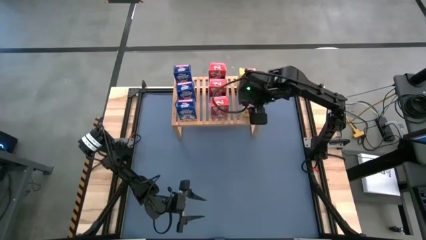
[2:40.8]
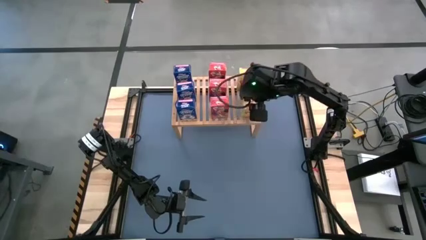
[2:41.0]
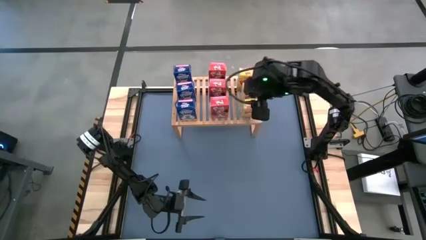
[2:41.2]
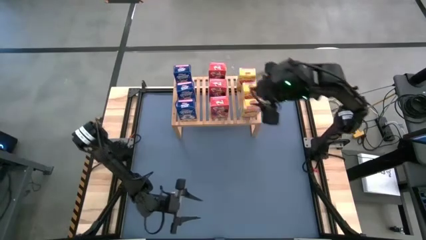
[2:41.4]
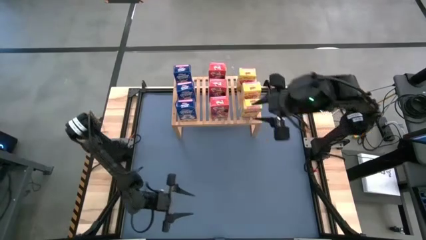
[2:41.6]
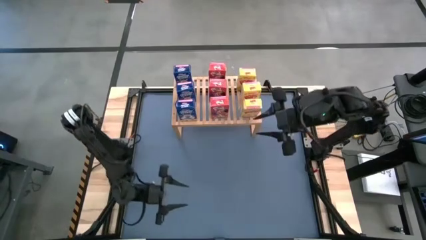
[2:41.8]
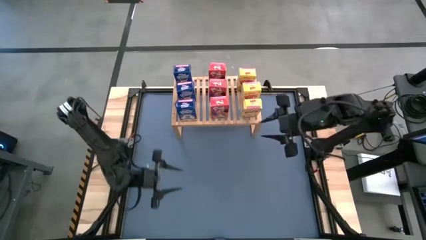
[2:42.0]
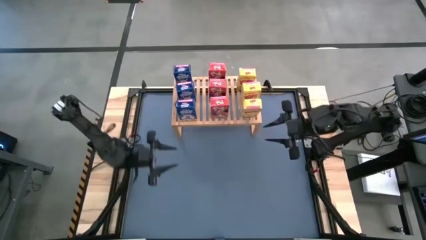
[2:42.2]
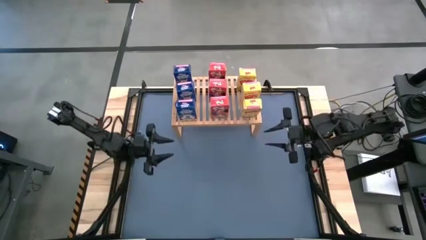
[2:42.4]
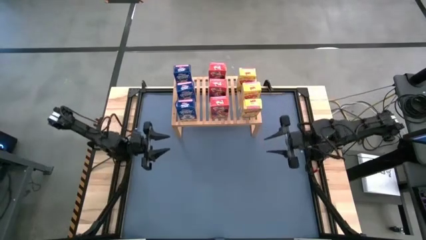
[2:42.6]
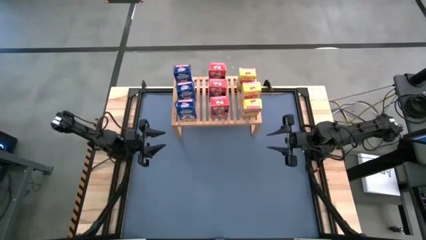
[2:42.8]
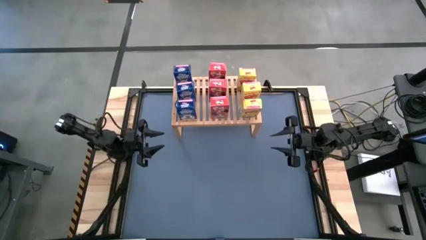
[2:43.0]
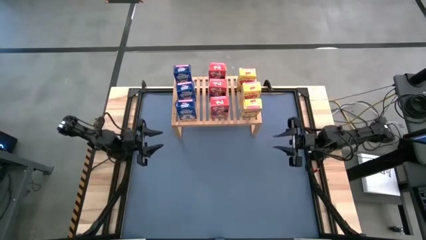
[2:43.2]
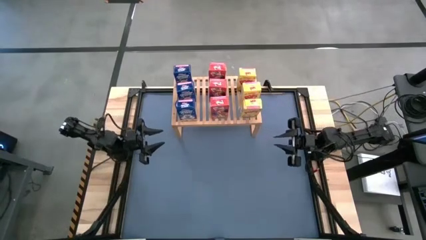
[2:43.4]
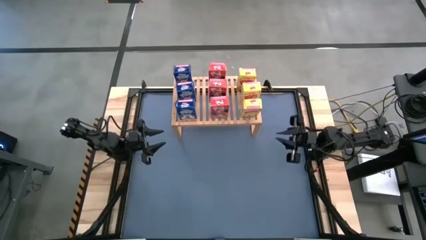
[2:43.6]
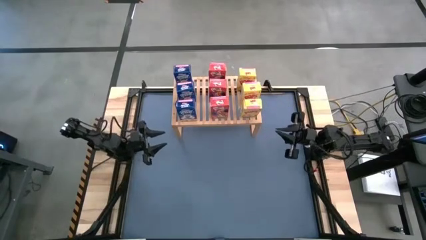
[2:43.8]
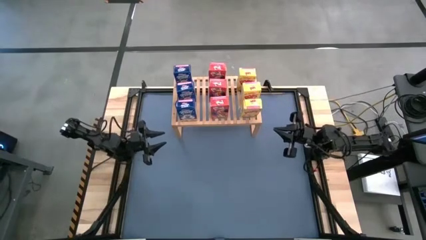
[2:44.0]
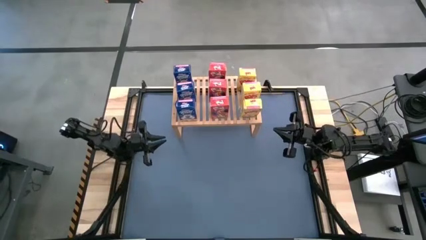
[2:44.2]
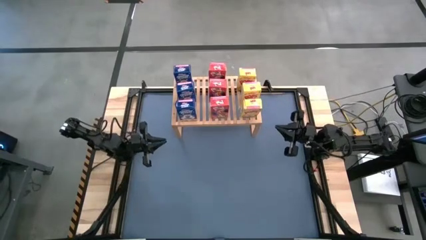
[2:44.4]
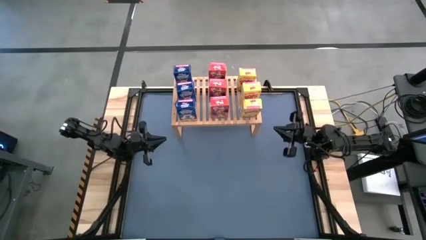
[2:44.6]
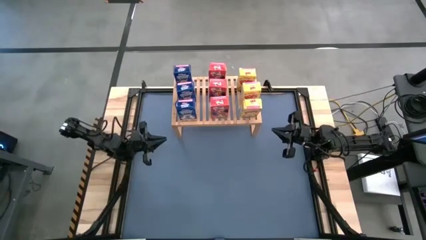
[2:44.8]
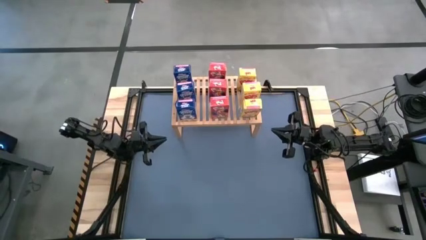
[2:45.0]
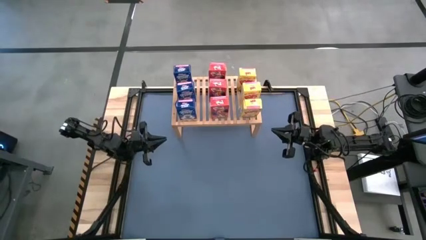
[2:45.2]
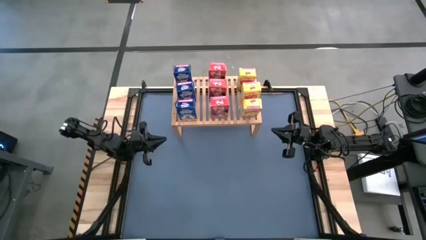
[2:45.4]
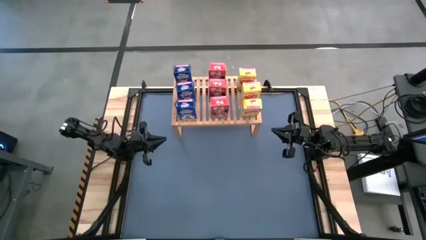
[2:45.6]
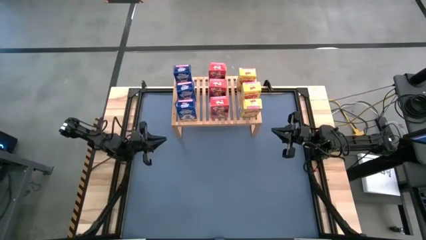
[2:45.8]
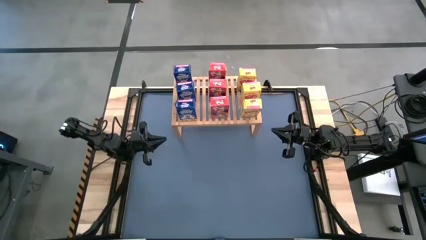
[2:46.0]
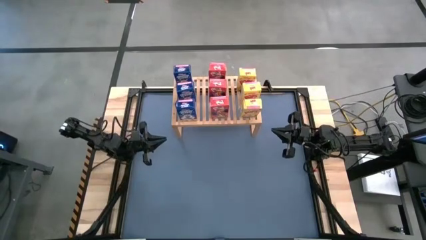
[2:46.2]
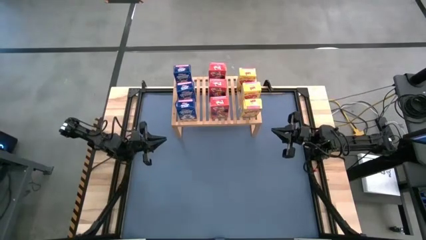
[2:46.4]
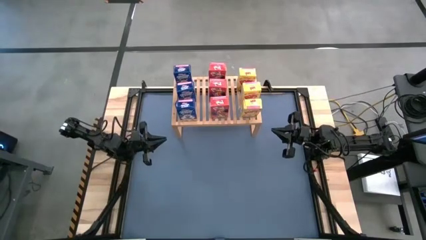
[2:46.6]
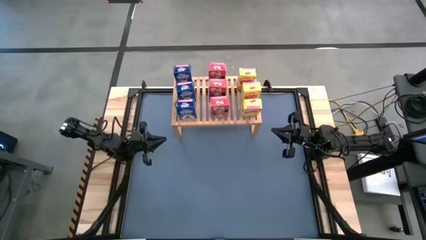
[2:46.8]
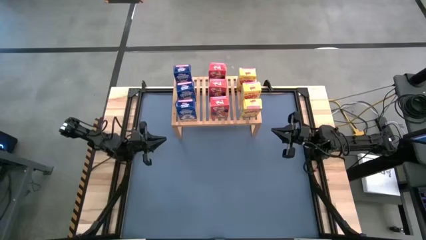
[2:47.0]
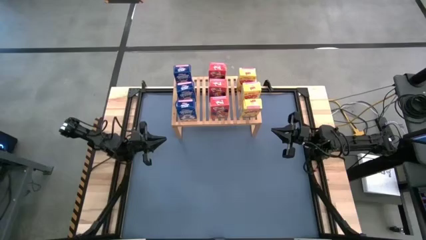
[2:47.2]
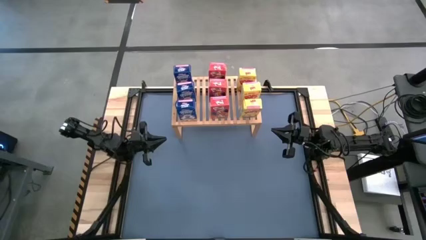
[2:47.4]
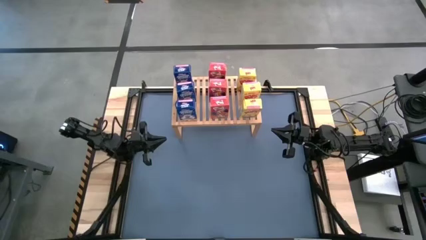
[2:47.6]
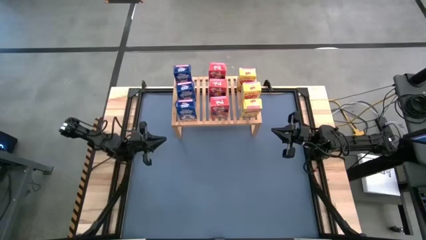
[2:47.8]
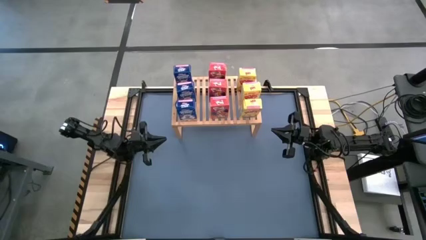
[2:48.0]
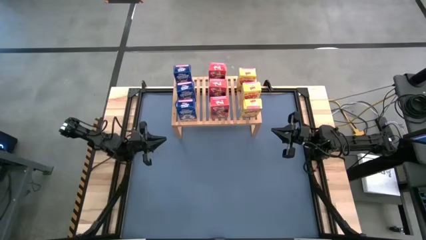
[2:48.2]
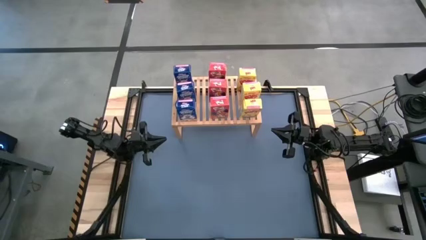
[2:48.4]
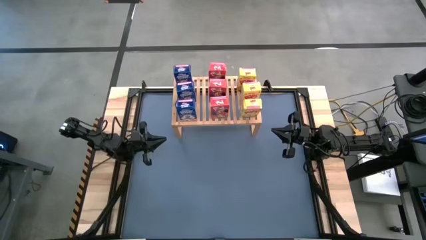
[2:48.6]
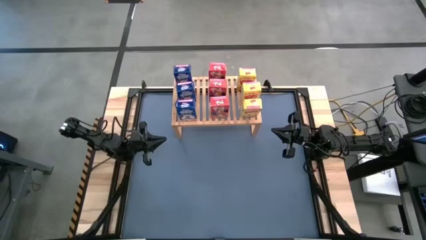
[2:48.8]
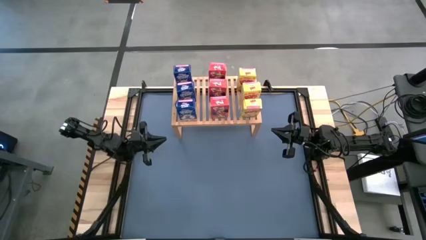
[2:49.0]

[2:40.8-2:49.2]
Task: Stack cereal on shelf
Return to Home Position

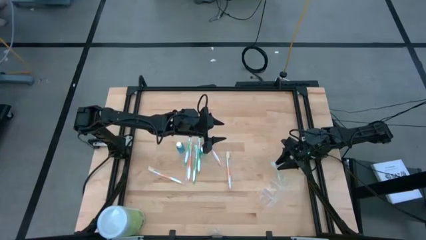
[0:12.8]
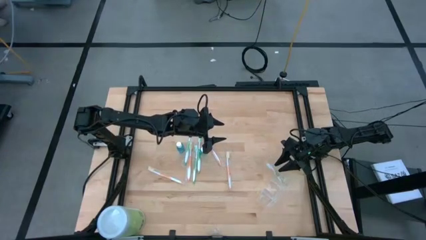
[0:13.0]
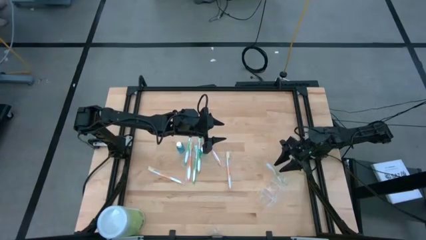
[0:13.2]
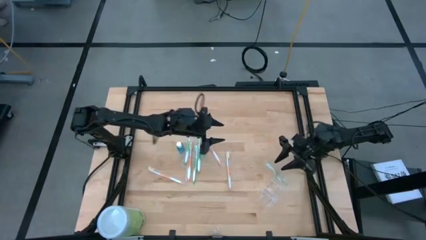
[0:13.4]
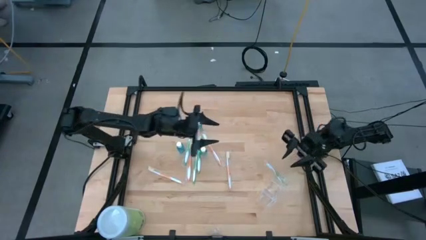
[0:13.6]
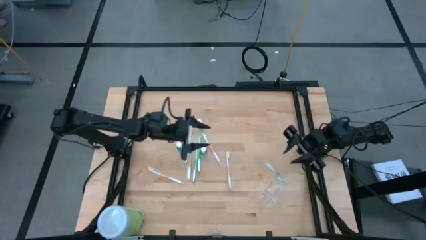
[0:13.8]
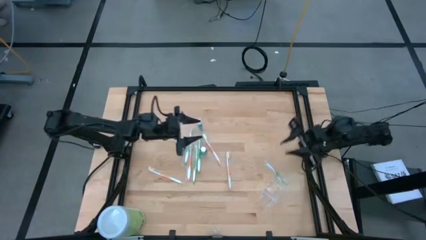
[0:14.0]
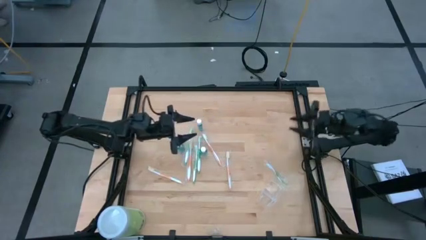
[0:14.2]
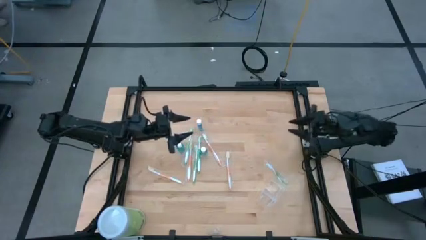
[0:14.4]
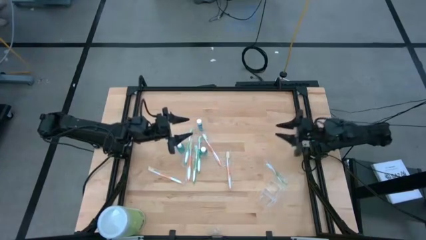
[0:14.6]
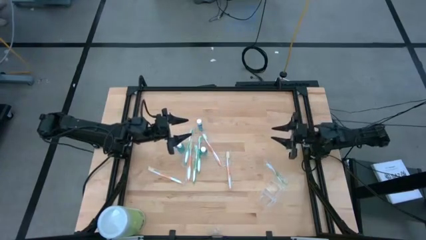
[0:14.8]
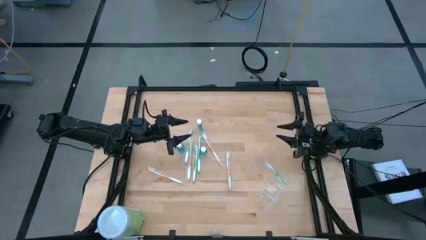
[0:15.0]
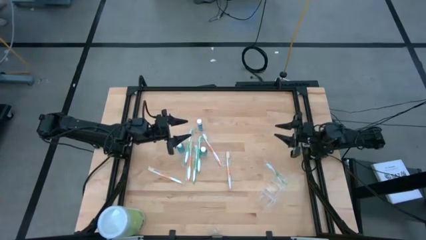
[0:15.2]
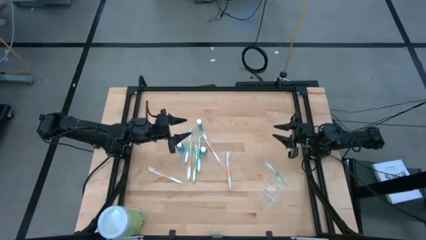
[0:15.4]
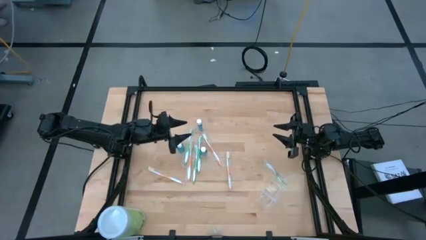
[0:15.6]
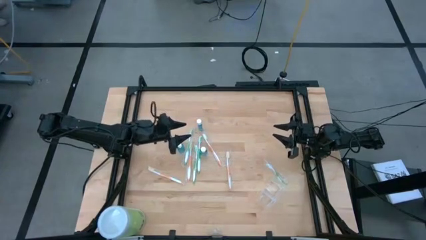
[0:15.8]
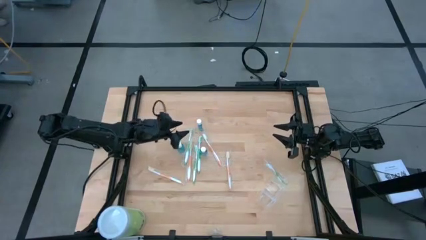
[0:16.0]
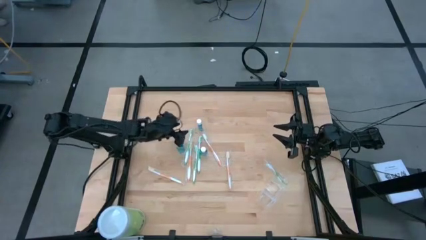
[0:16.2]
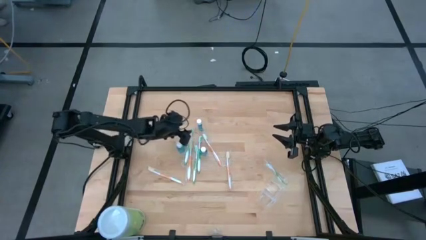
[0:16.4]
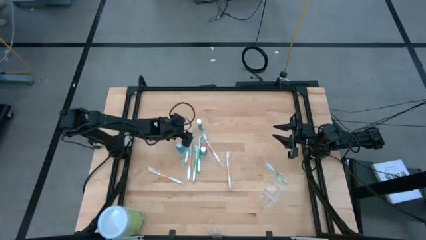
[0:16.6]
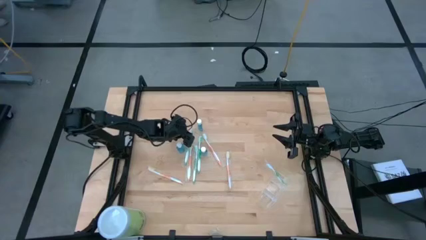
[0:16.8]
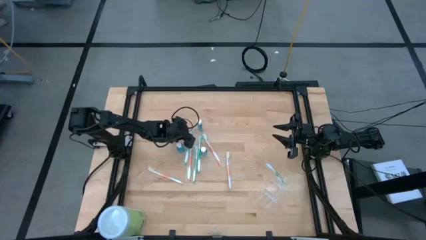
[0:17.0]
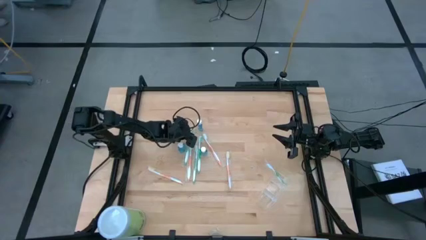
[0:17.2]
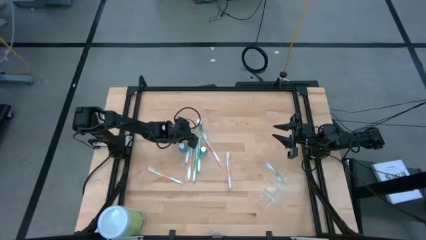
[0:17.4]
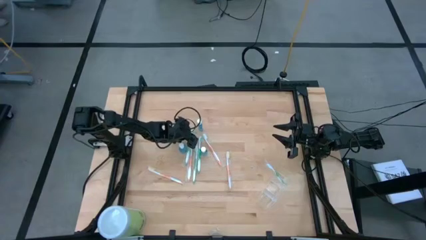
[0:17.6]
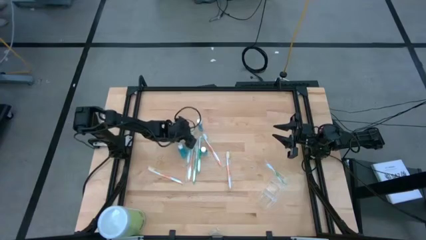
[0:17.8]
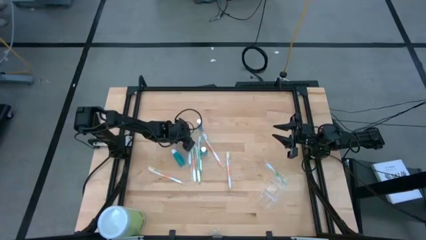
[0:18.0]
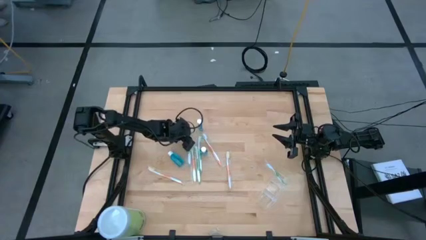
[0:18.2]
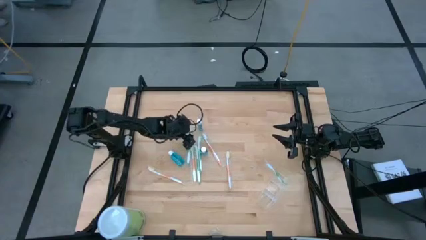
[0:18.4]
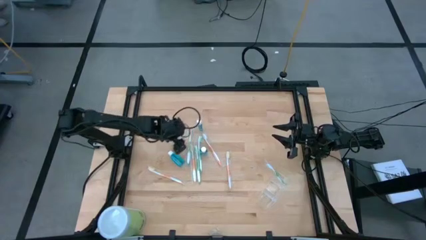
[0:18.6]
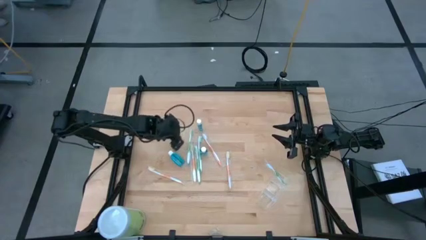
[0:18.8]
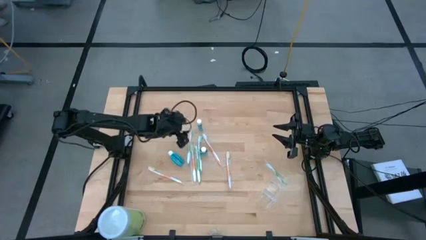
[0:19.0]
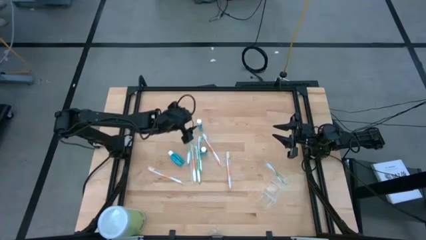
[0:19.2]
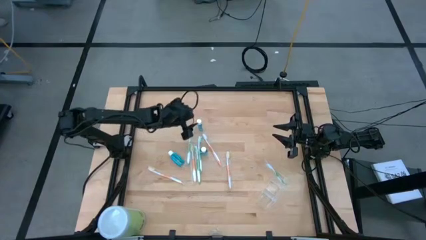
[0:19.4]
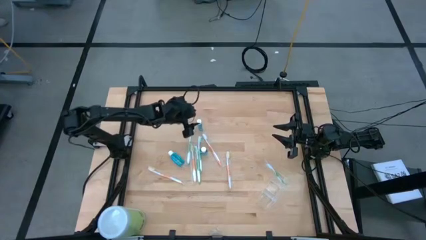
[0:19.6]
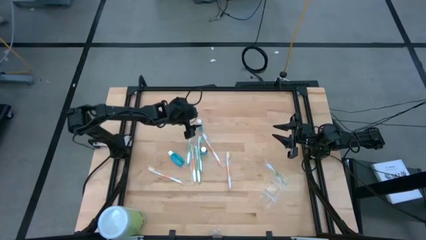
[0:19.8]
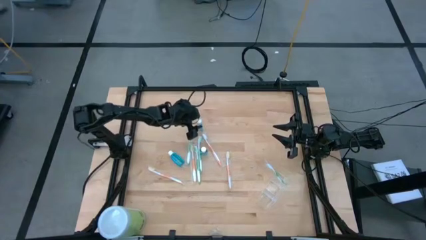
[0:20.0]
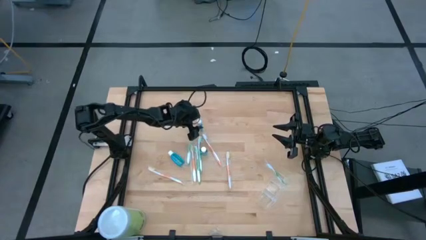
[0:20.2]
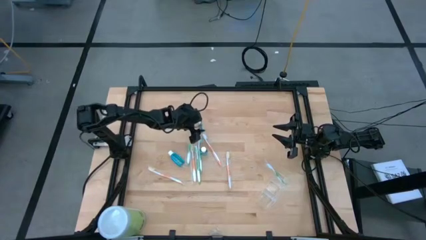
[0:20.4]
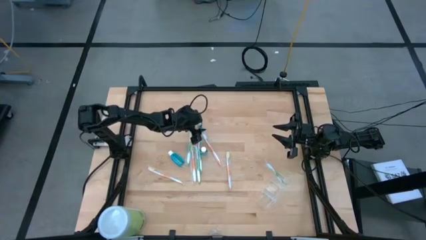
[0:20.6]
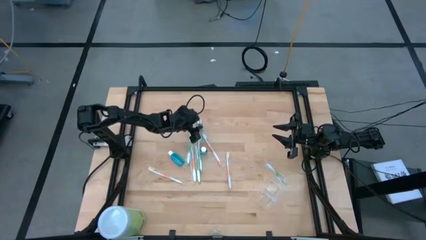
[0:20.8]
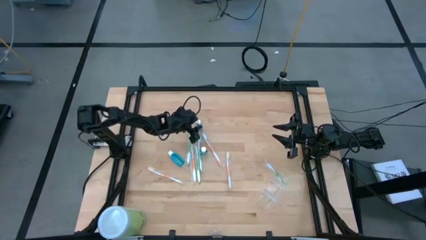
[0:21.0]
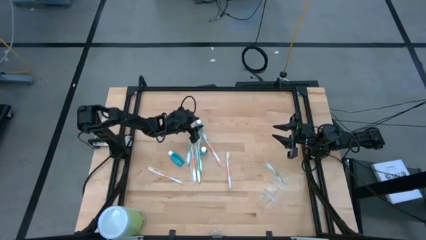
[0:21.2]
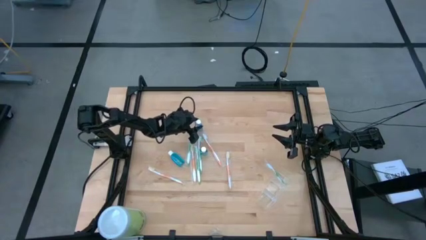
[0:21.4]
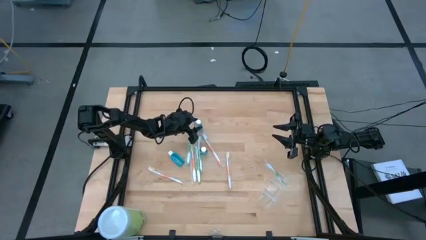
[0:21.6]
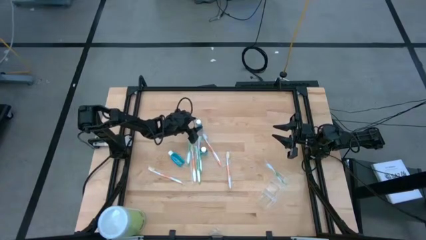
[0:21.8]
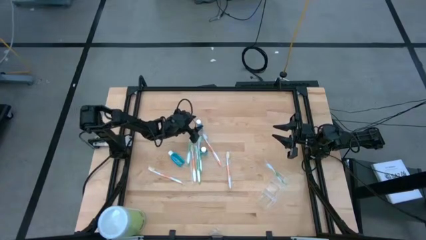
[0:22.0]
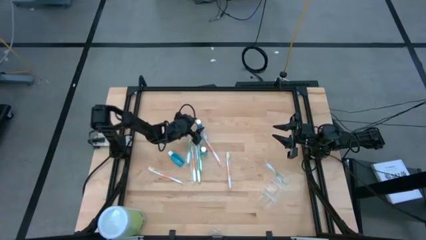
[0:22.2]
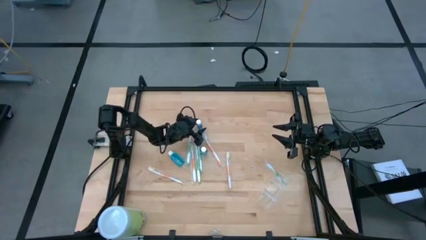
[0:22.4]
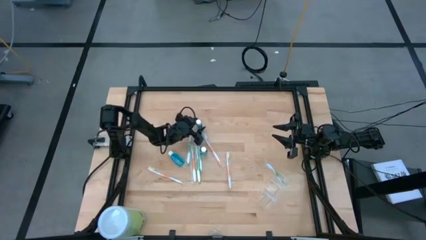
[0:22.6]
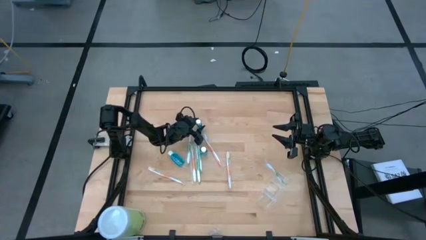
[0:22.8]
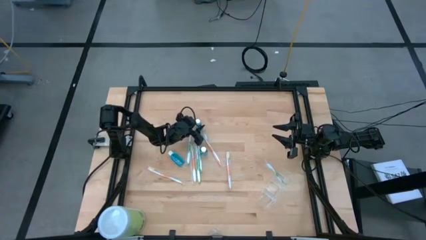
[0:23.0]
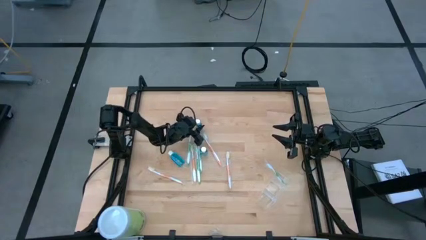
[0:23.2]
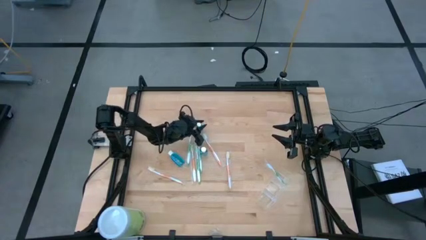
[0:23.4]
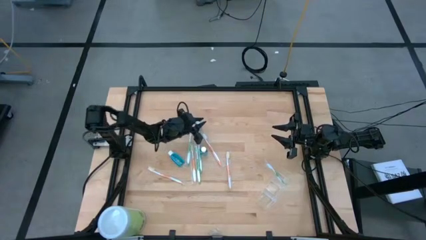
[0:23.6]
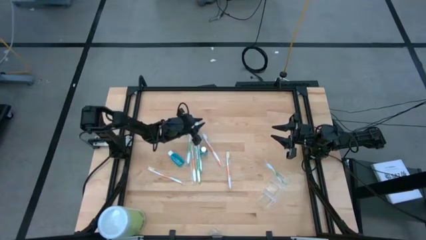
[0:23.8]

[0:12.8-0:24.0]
Task: Pick & Place toothbrushing station
Put the blue mouthwash into the middle section of the transparent organizer
